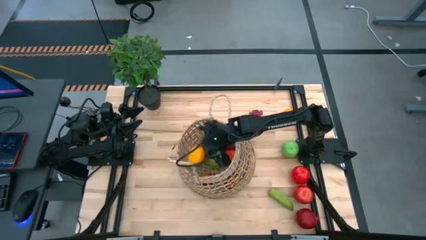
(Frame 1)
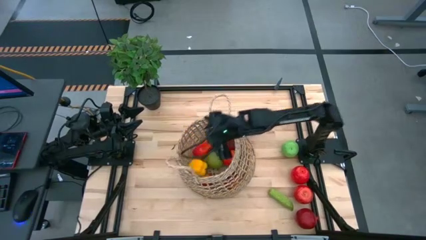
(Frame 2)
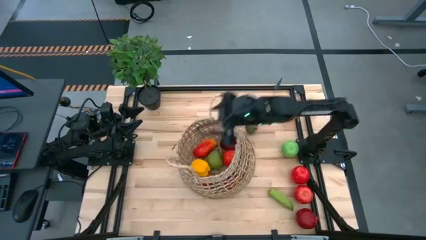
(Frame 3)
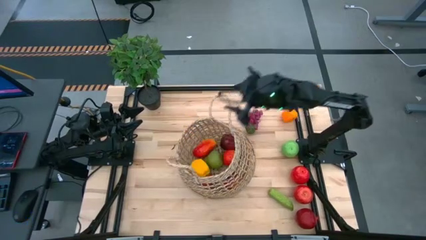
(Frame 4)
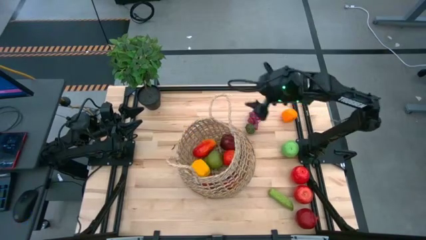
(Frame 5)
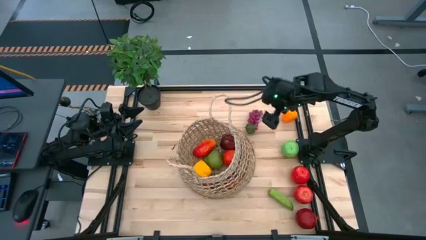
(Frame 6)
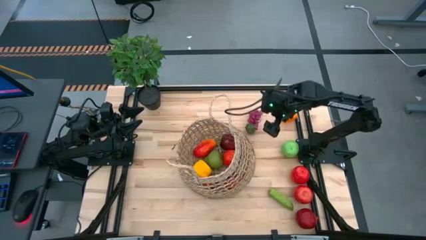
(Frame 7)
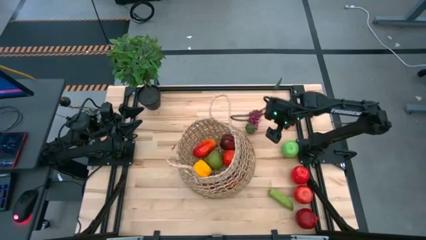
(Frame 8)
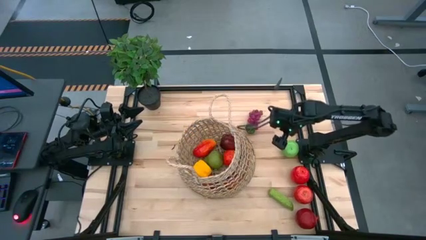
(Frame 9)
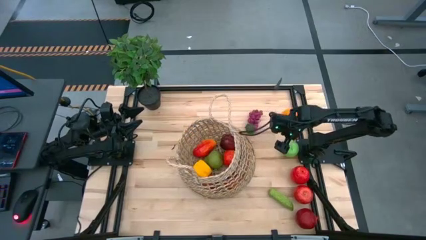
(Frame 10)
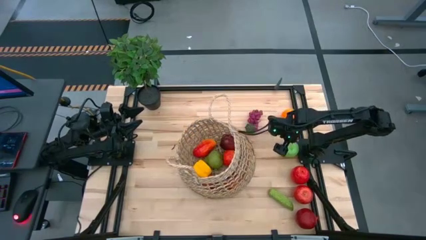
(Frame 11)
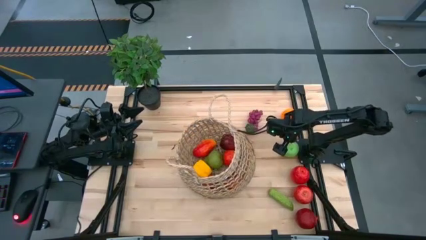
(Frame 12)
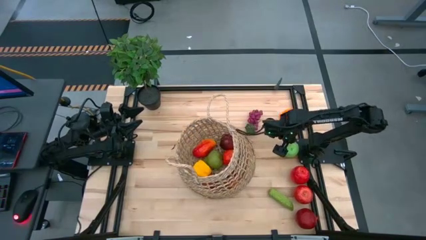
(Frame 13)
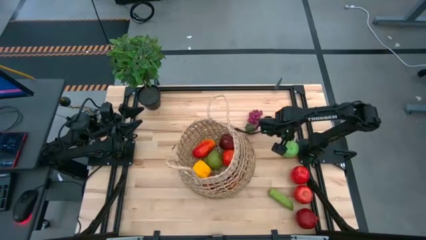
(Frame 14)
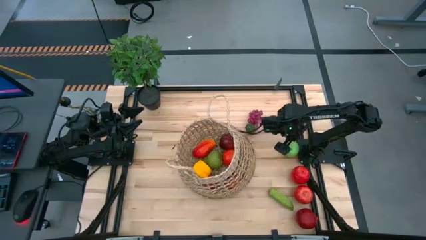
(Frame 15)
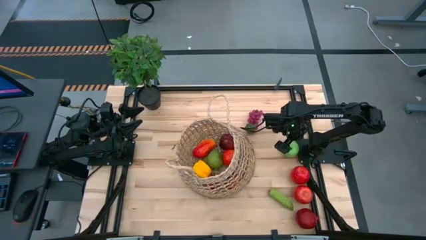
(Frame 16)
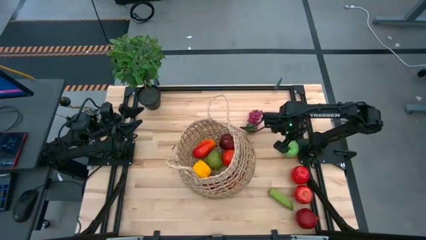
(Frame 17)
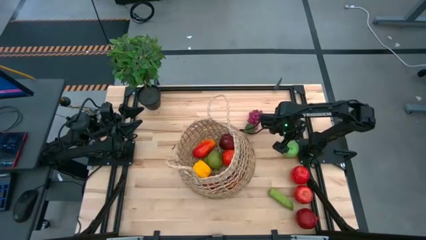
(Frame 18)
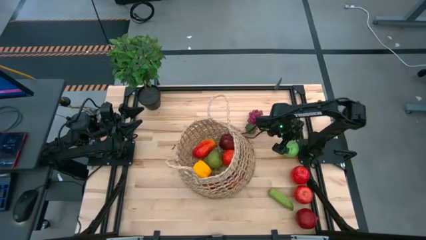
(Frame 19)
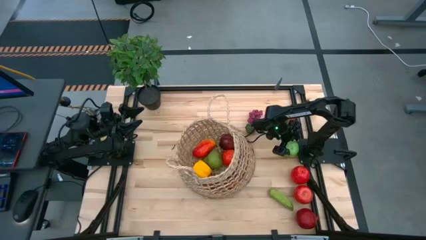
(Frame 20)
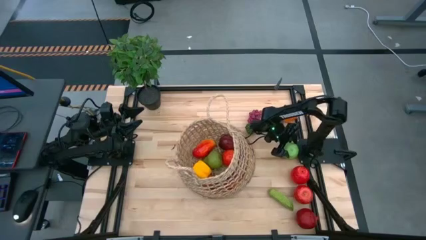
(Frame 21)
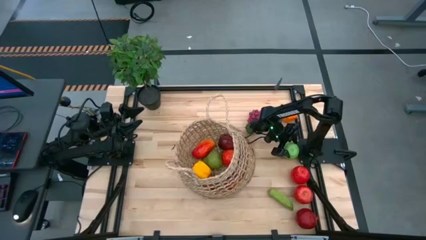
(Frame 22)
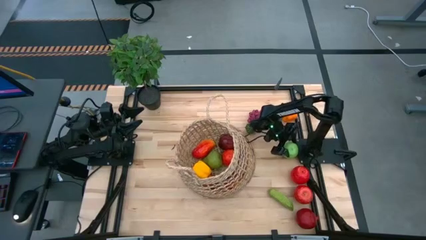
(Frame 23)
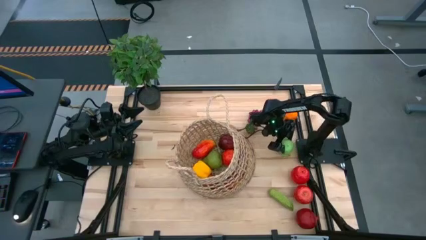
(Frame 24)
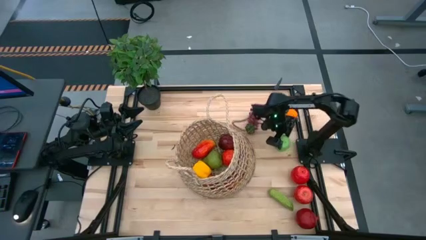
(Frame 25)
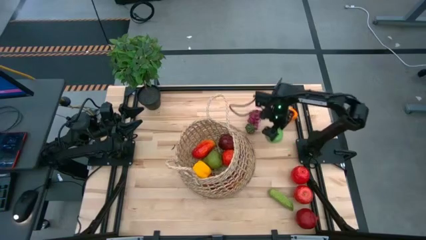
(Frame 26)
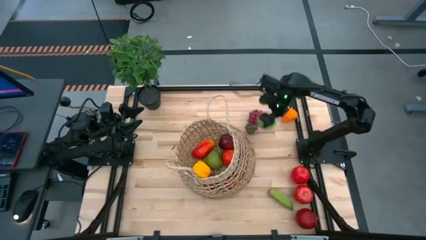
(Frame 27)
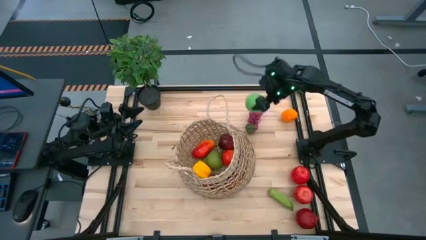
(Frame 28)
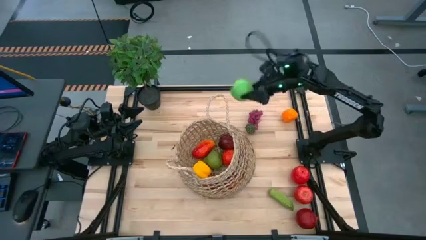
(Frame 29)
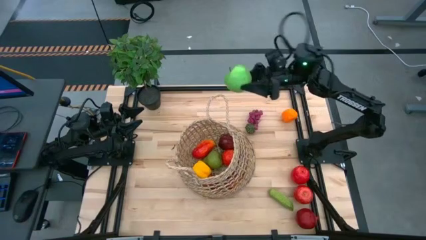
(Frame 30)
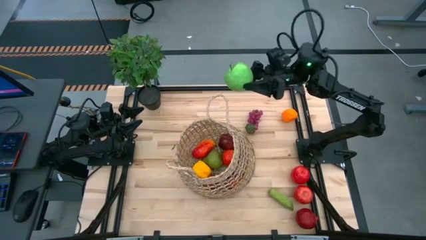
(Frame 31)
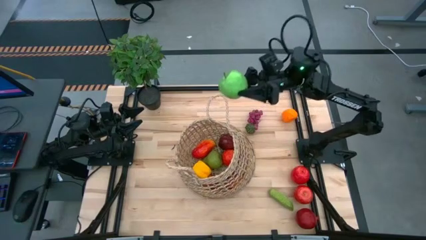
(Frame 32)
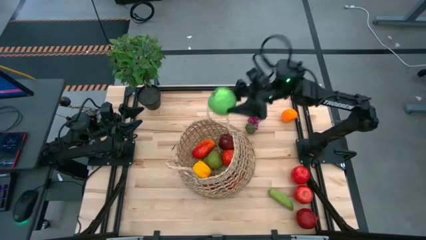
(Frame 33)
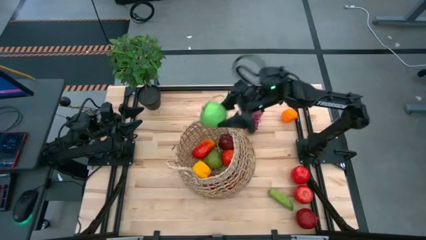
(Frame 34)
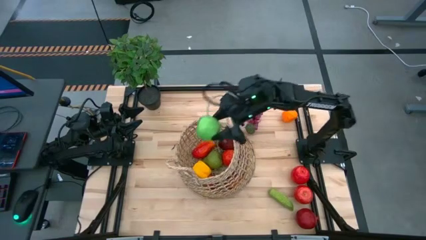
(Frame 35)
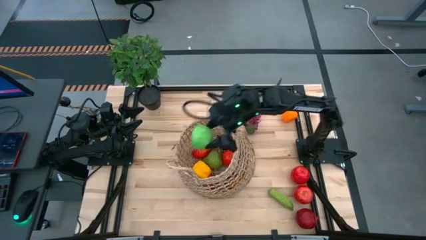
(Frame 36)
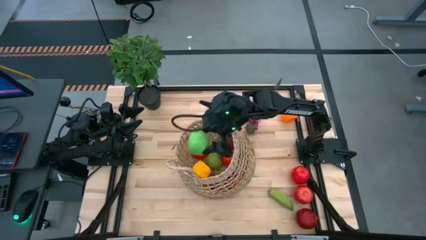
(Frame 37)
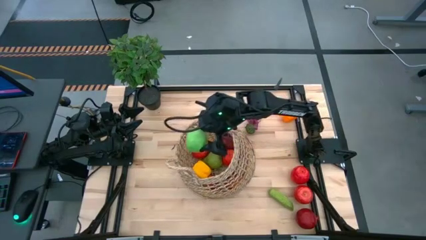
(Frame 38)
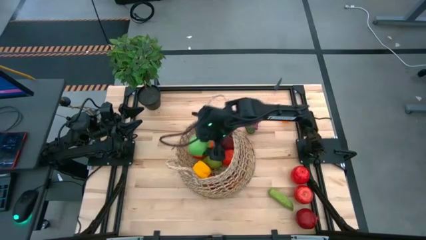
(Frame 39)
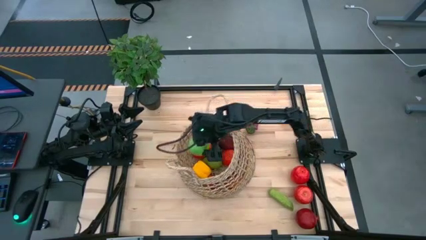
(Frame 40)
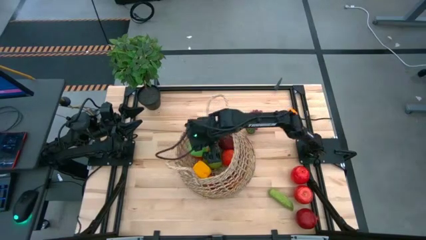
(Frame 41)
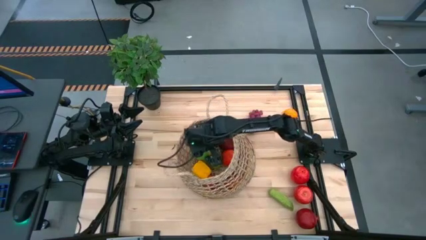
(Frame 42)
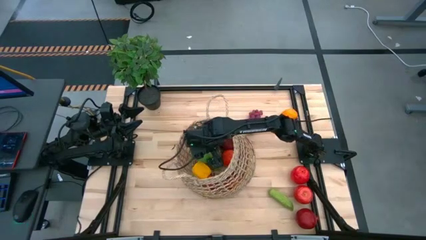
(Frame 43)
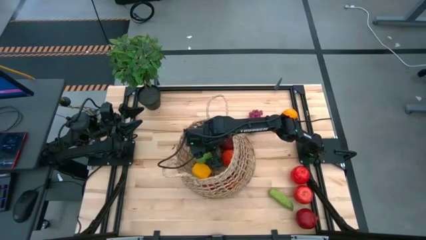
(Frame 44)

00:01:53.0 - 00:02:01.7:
Task: Build produce basket
Put the green apple into the brown basket

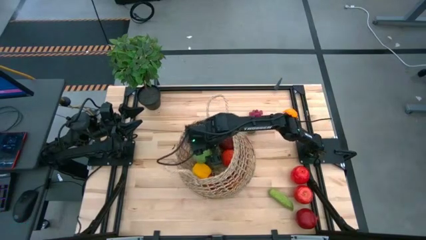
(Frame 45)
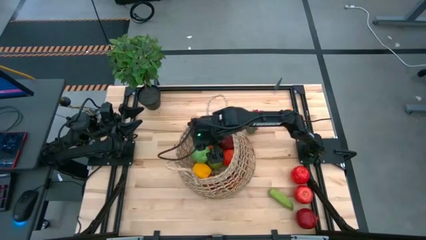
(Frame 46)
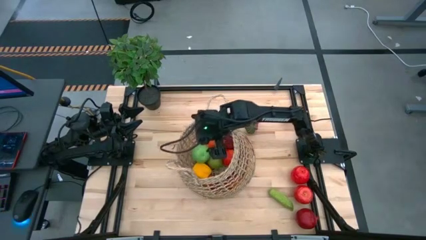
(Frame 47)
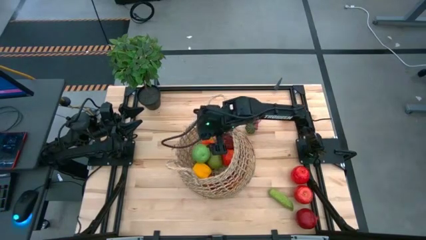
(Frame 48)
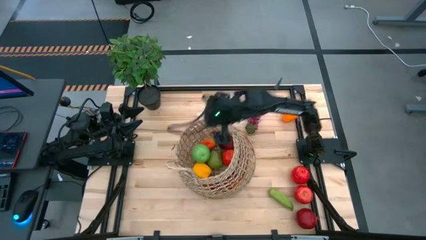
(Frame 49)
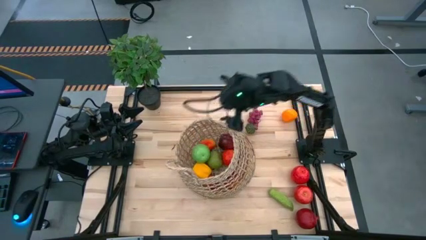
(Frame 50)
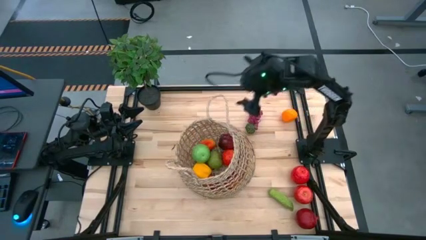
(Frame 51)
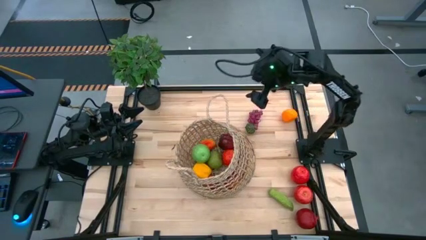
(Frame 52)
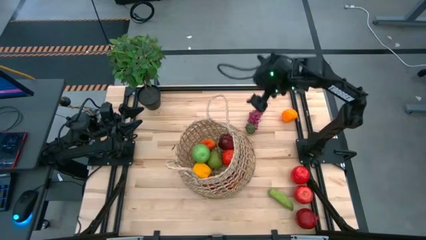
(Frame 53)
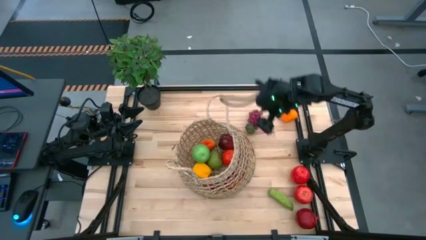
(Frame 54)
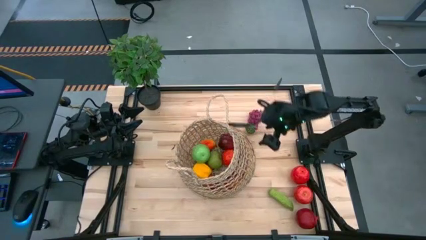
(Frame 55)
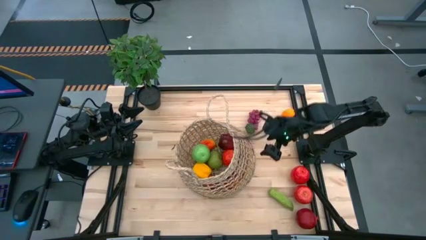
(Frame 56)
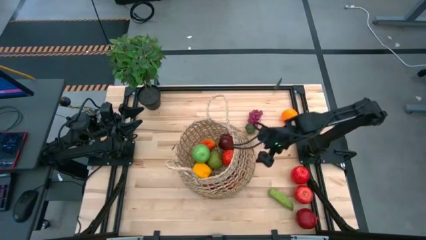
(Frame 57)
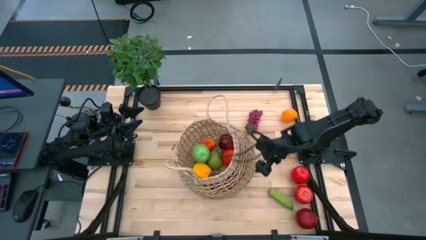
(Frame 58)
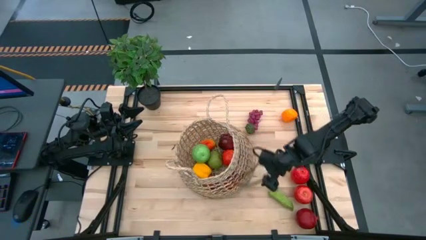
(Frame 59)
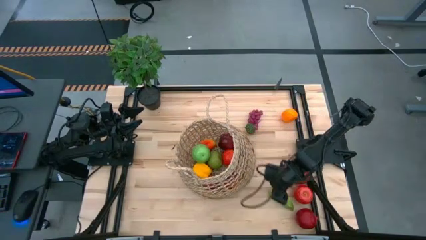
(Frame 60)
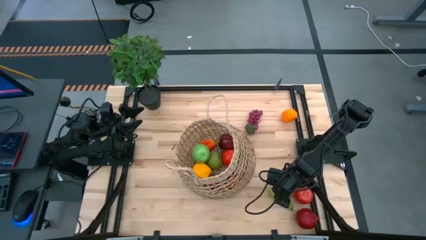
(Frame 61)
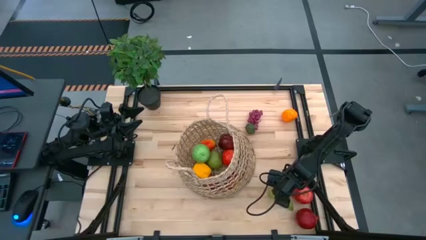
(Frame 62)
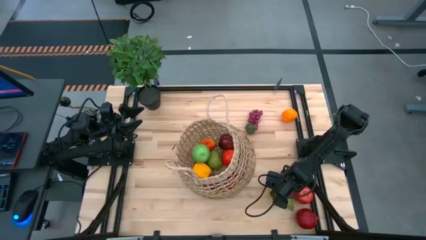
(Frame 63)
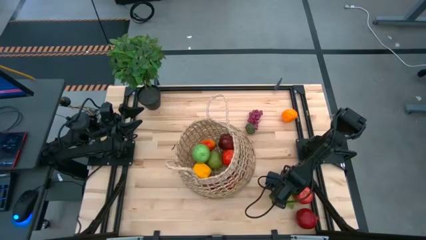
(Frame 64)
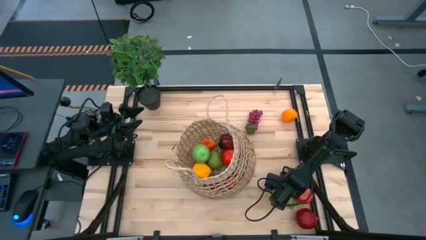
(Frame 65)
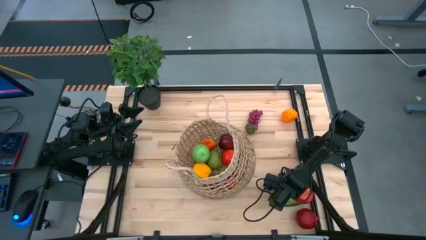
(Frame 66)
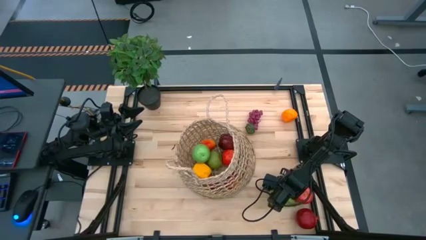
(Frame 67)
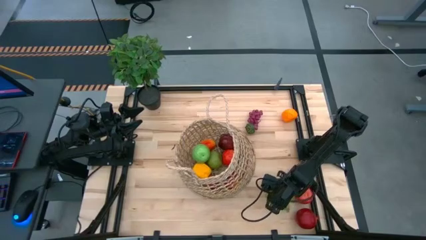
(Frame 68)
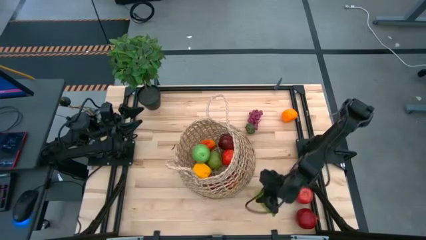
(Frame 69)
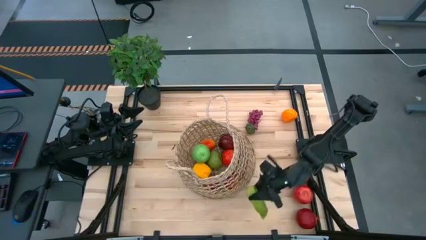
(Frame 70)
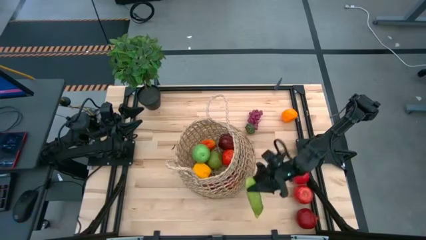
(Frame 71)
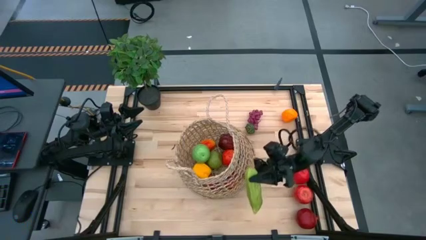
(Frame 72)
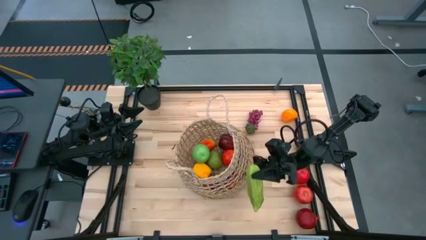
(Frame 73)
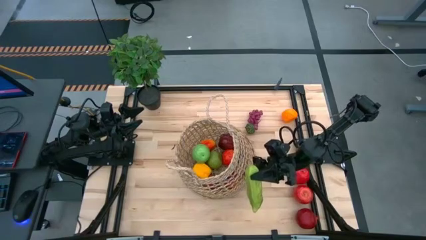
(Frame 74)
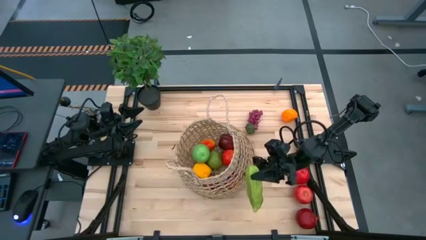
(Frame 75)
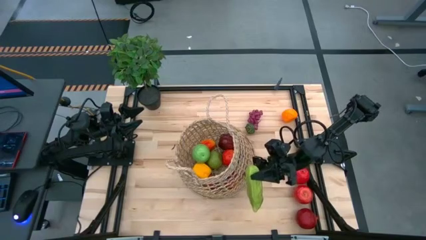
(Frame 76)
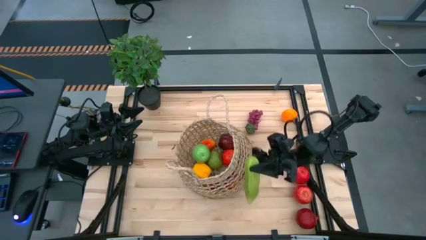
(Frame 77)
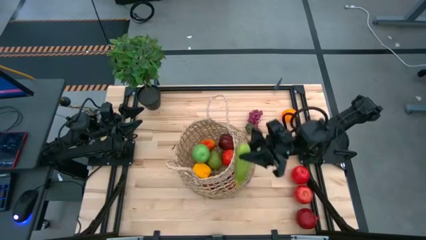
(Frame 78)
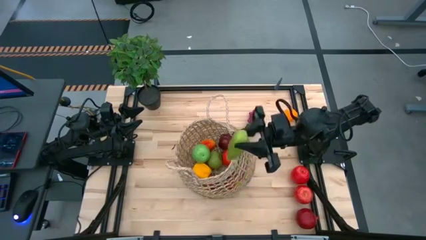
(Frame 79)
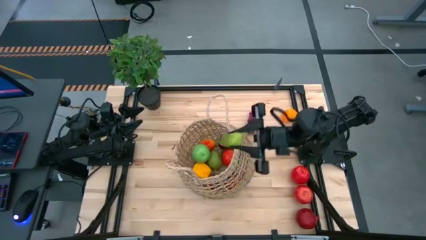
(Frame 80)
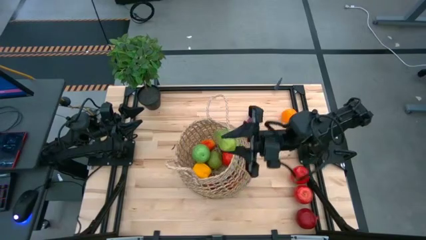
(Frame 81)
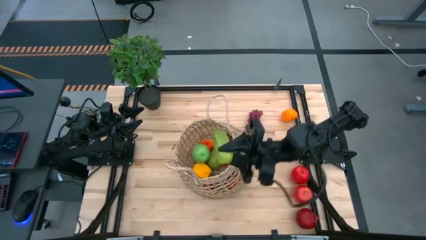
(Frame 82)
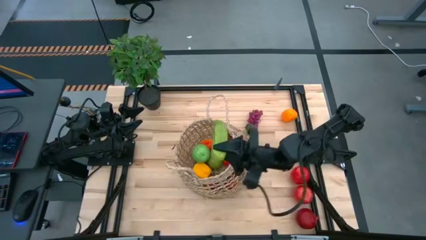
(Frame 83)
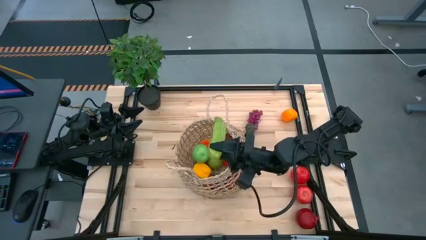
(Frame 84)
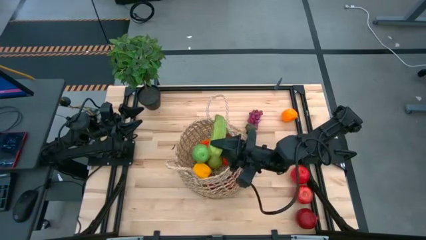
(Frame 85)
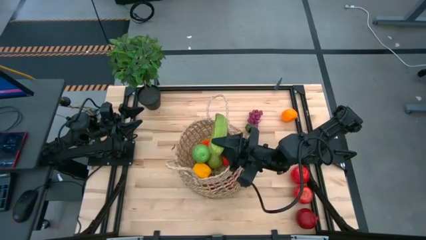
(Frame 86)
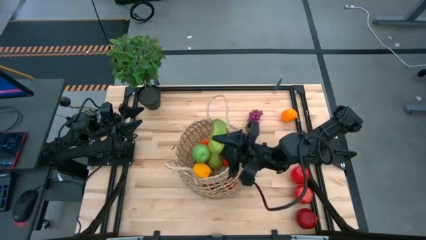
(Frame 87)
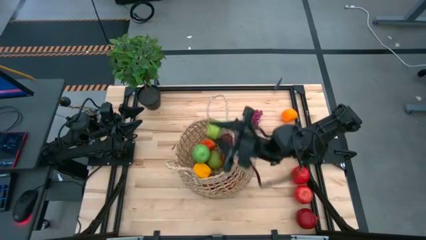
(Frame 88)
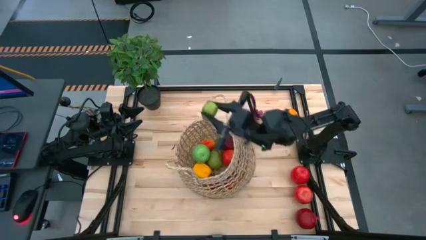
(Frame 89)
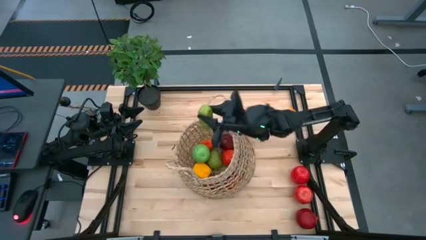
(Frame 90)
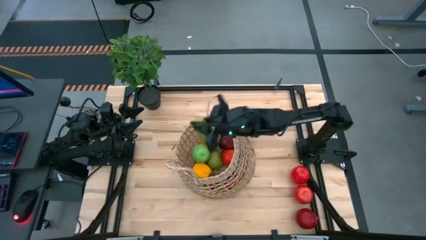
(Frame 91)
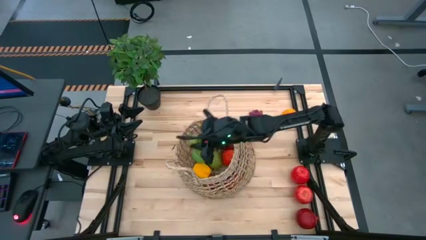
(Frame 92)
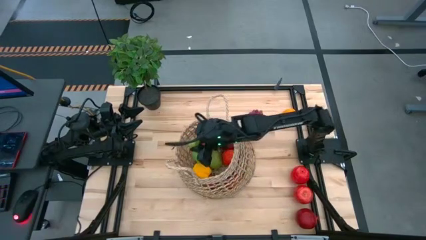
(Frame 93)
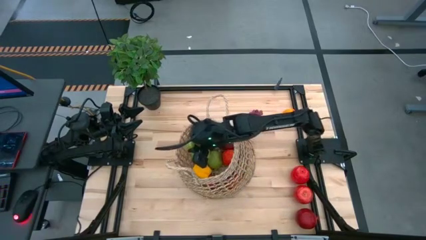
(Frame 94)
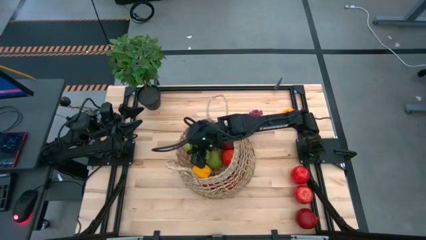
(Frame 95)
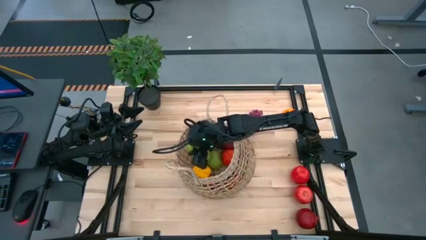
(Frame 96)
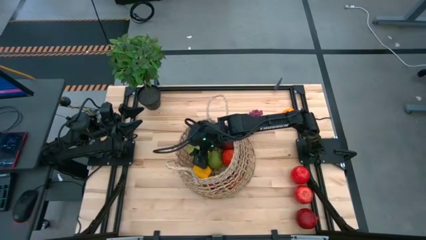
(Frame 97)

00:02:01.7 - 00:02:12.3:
Put the green cucumber into the brown basket
